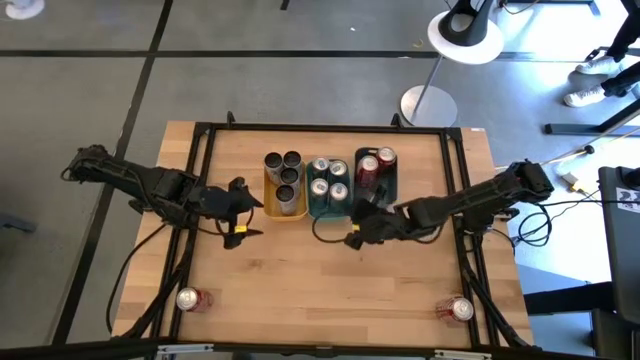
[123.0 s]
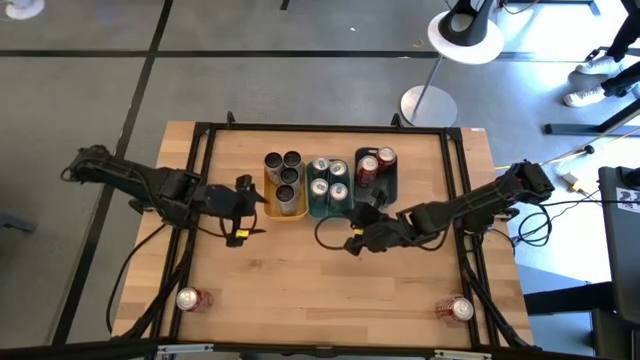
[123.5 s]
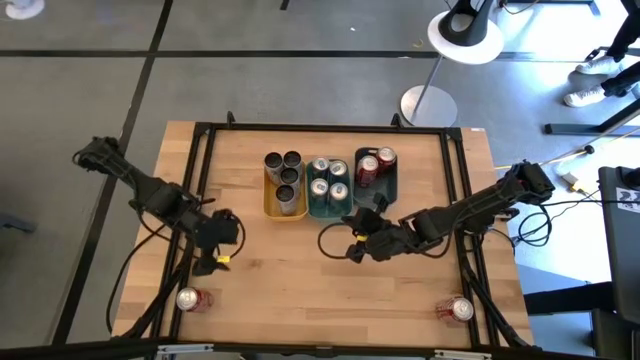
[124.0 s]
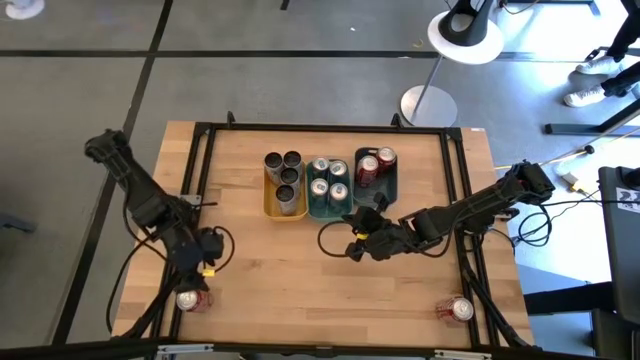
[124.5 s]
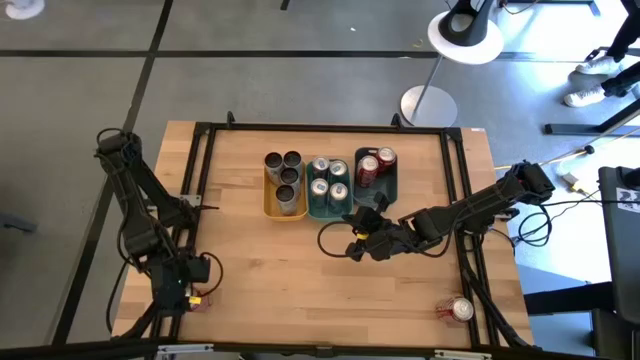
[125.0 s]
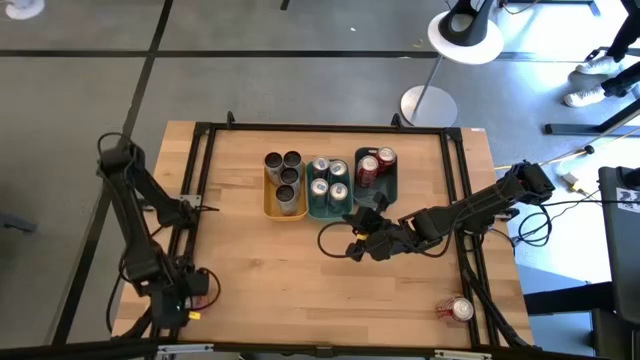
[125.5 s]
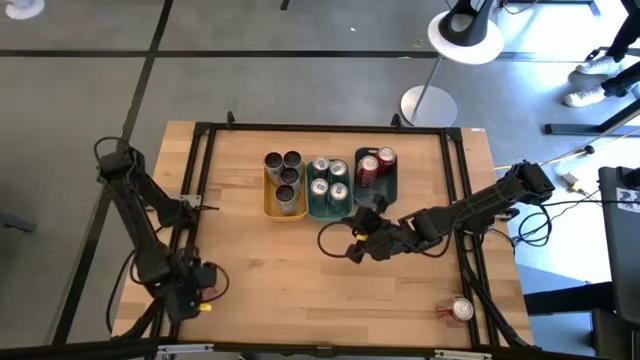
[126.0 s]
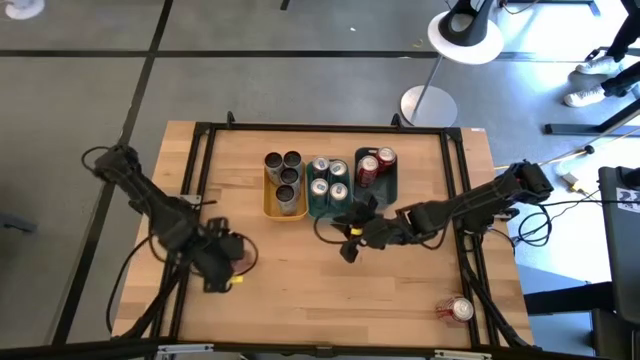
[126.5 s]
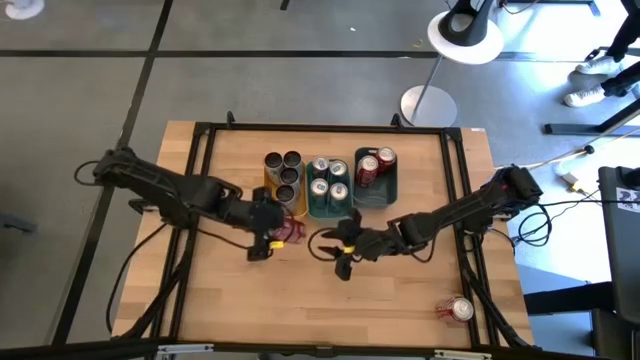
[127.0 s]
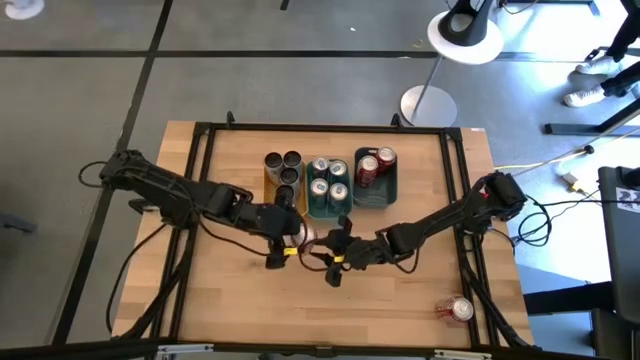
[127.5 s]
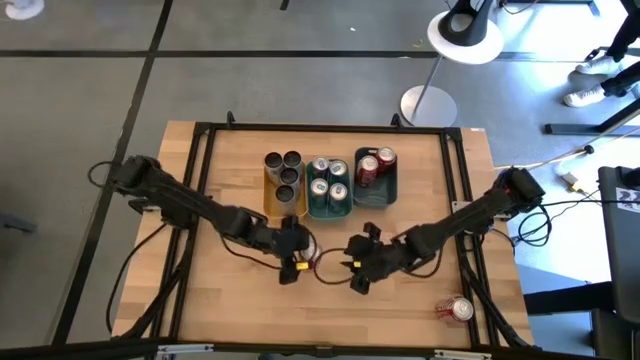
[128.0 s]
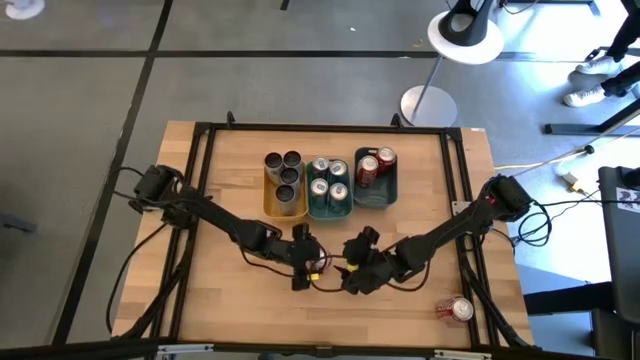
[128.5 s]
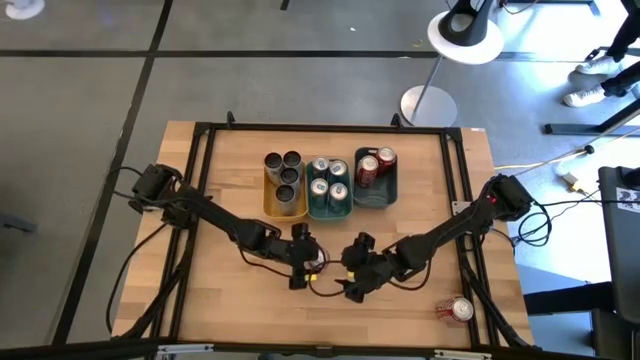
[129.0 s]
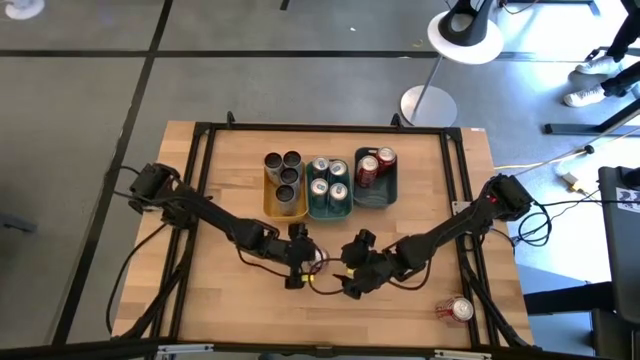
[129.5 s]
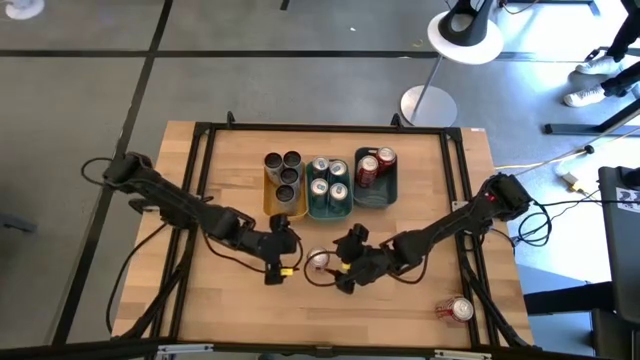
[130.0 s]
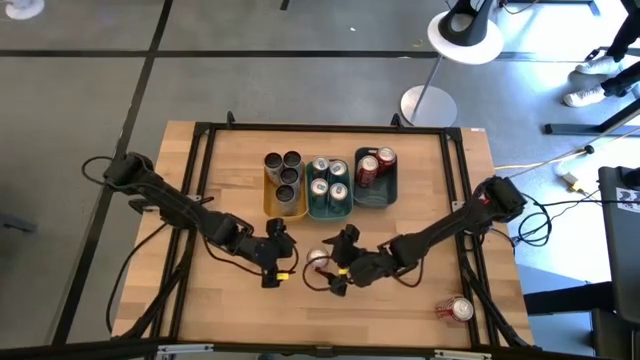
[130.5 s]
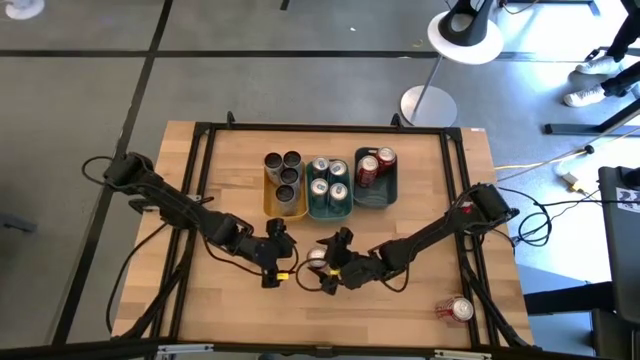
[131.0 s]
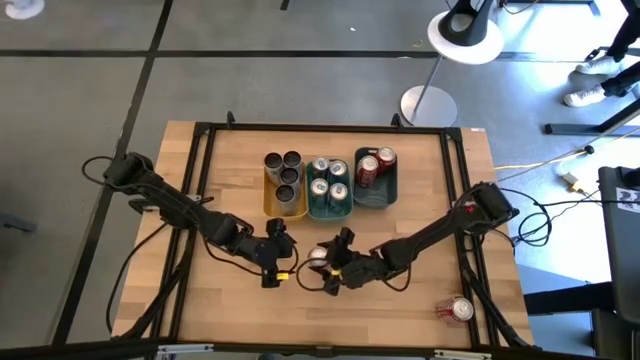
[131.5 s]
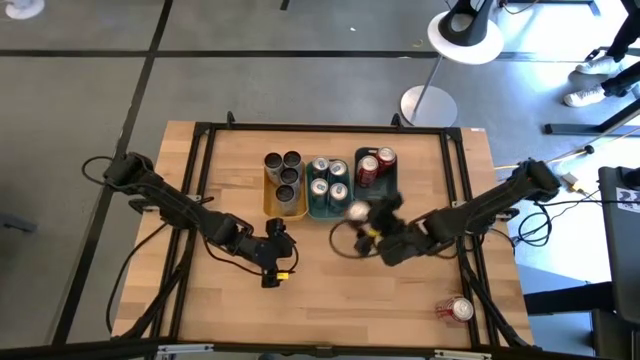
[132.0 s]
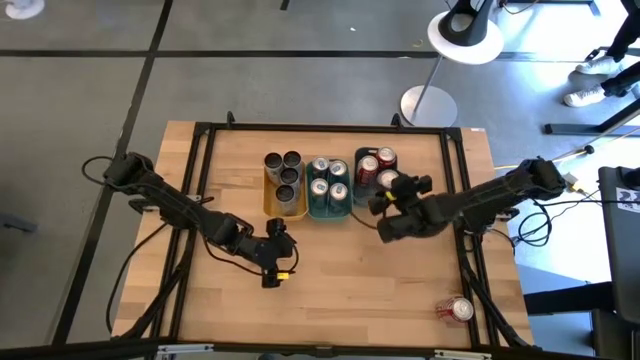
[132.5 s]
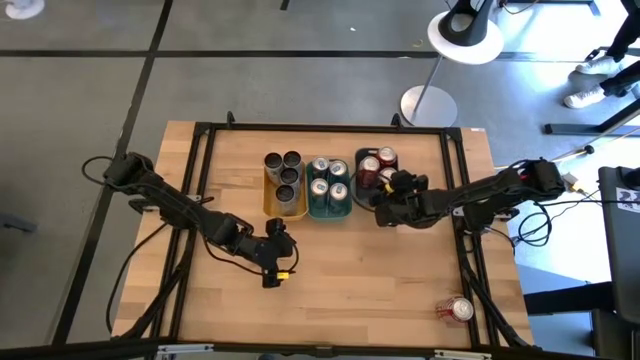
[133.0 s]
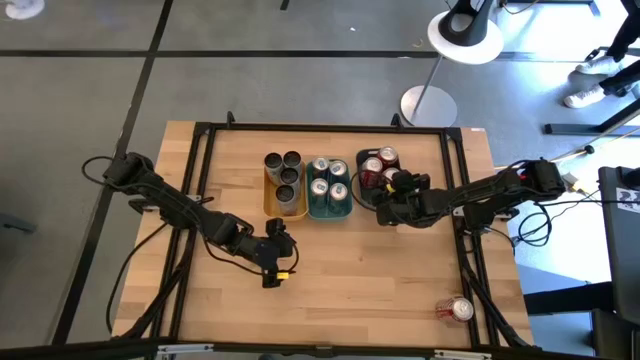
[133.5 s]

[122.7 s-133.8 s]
Task: Sort soda cans
Put the left red-white soda can into the blue bin

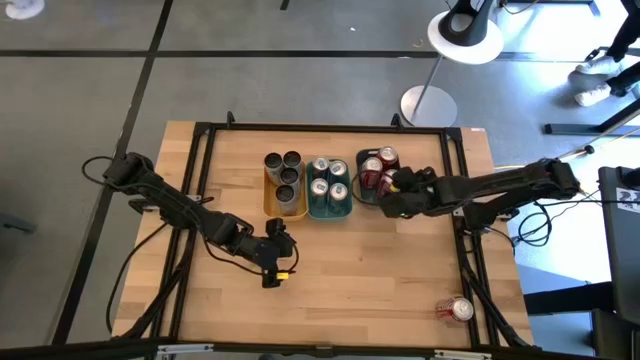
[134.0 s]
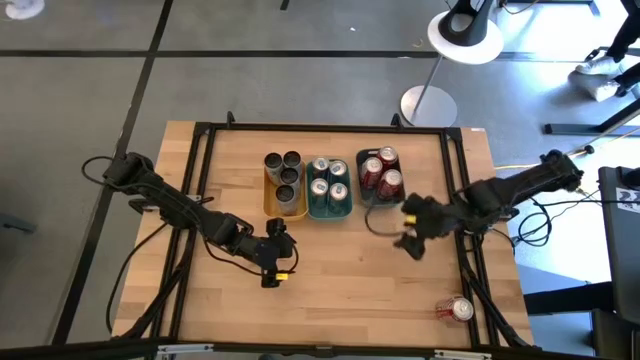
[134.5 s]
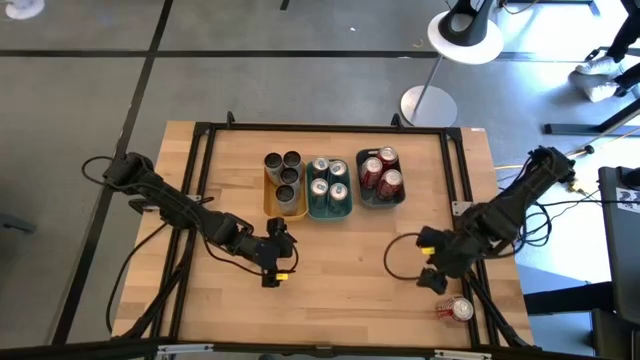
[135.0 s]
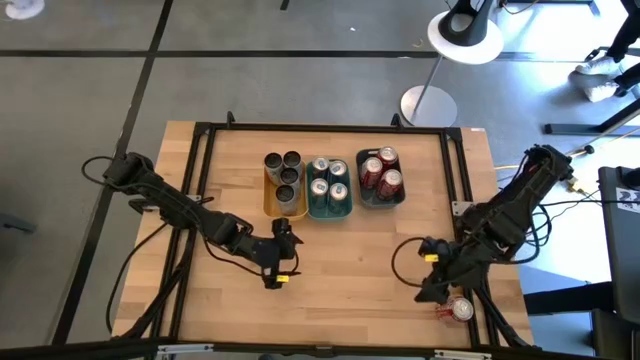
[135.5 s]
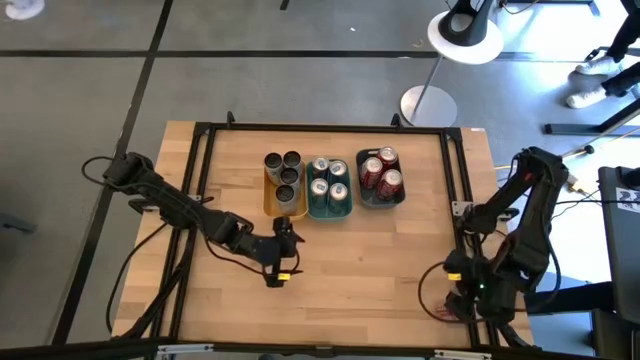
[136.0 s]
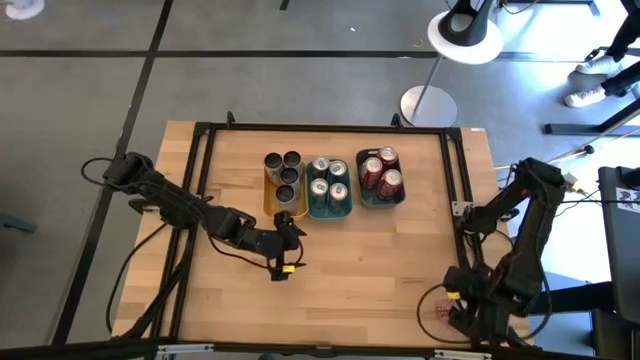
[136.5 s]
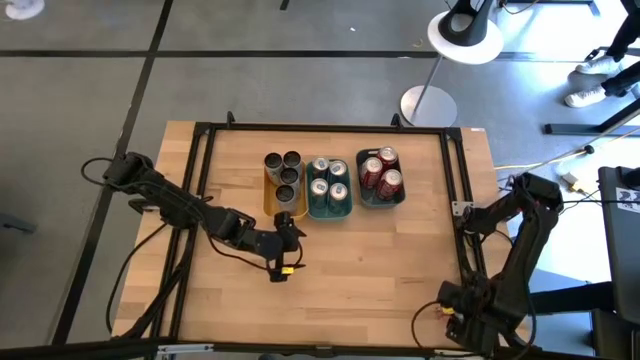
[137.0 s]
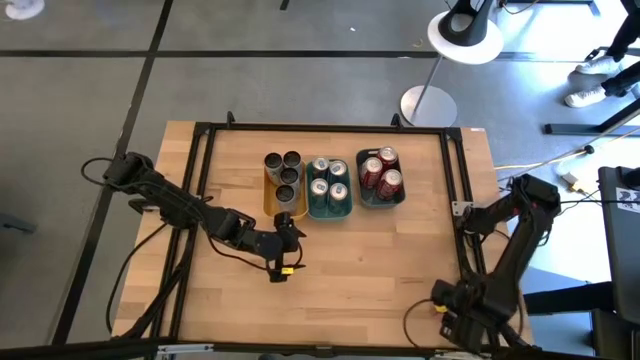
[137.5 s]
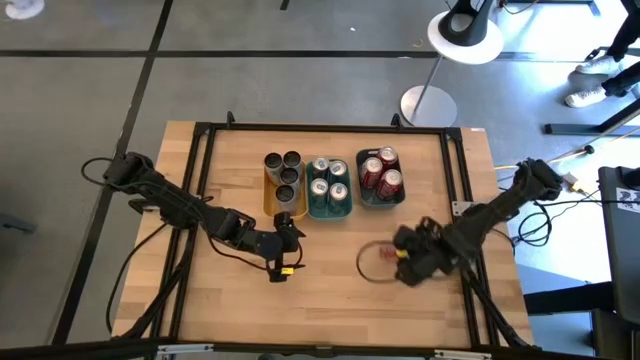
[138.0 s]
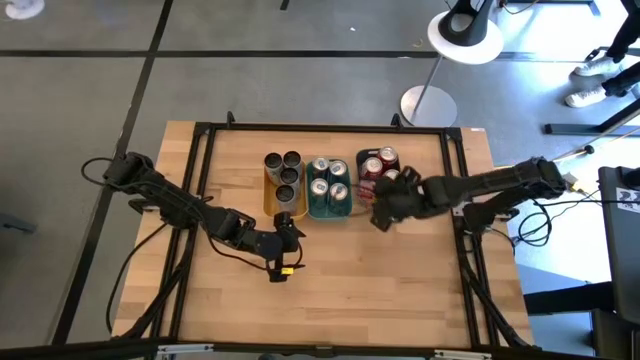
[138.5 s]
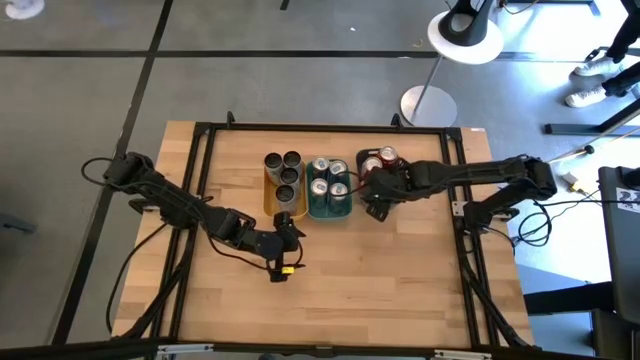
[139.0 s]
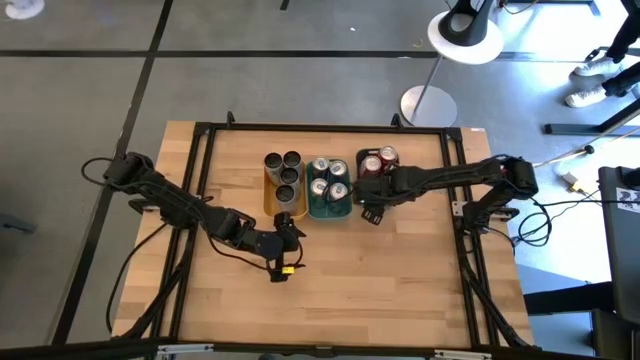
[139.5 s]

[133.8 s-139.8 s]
Put the red-white soda can into the blue bin

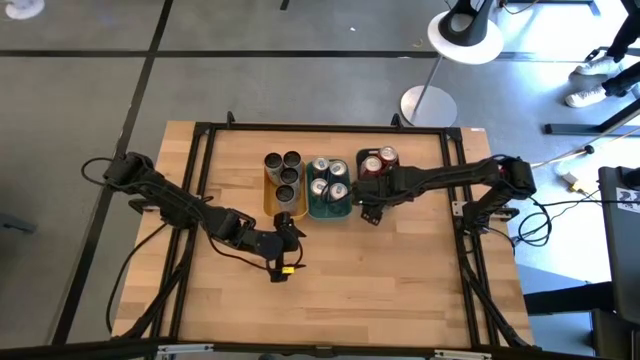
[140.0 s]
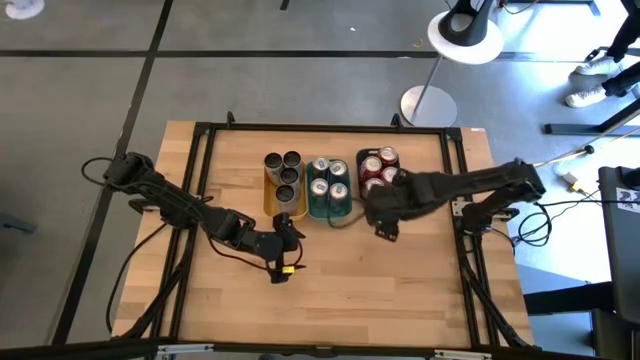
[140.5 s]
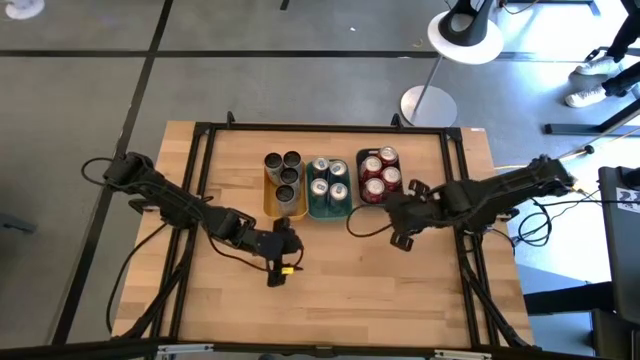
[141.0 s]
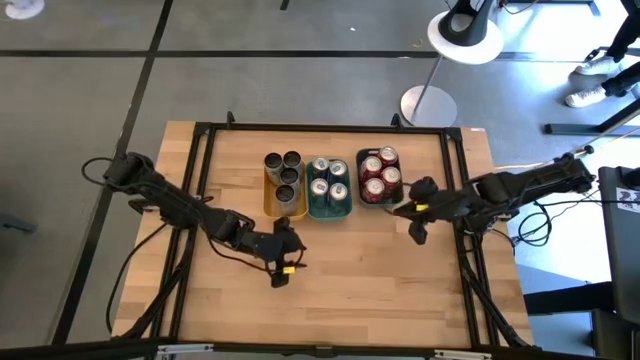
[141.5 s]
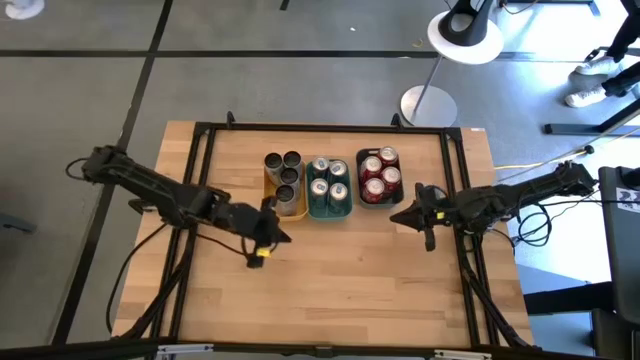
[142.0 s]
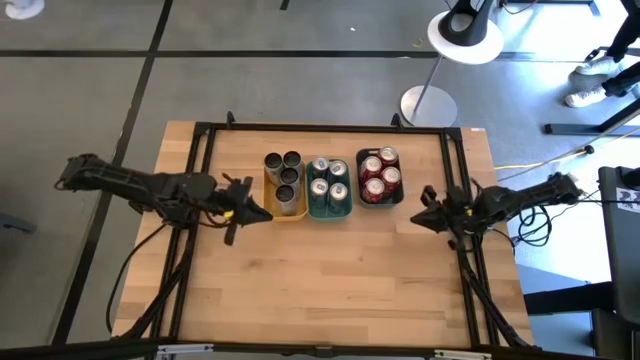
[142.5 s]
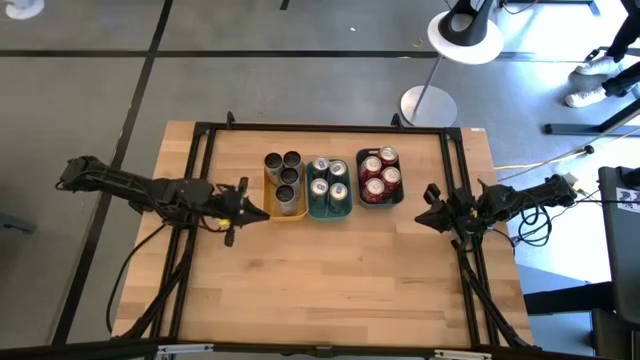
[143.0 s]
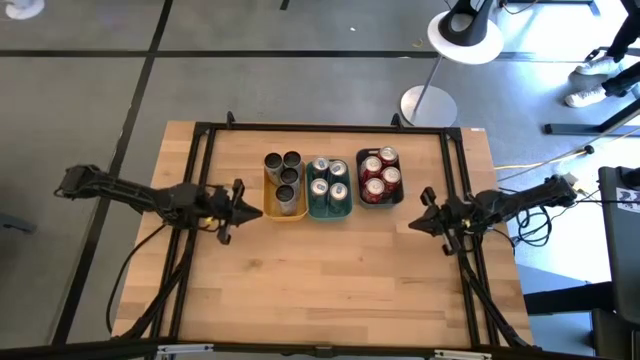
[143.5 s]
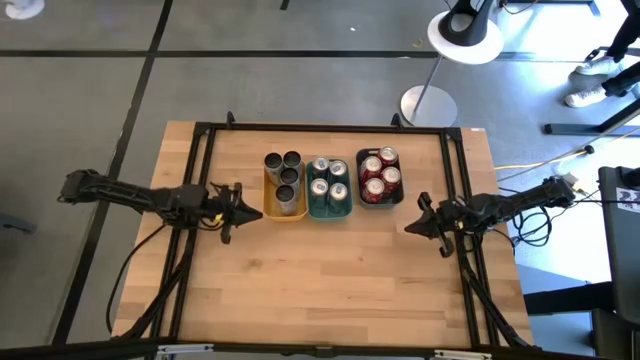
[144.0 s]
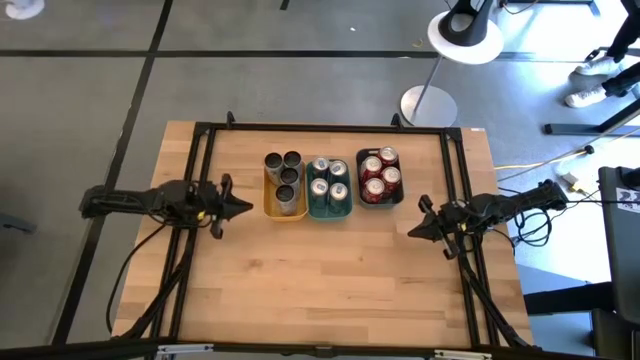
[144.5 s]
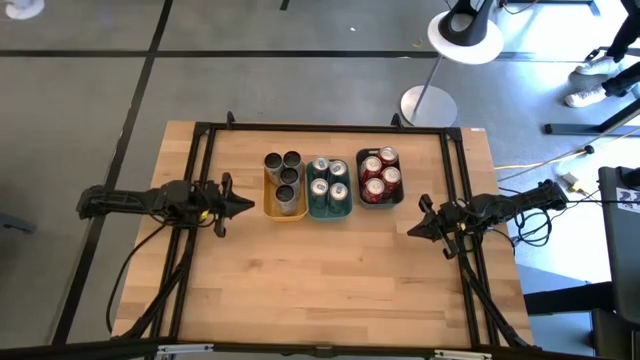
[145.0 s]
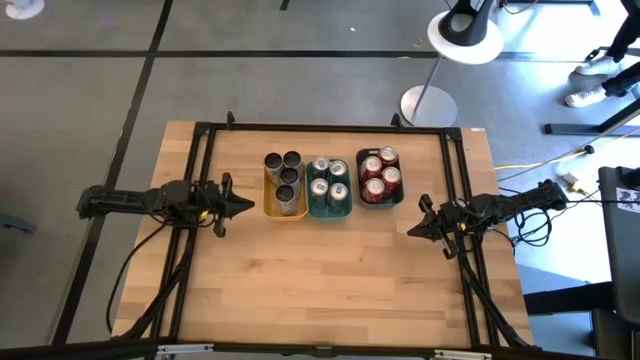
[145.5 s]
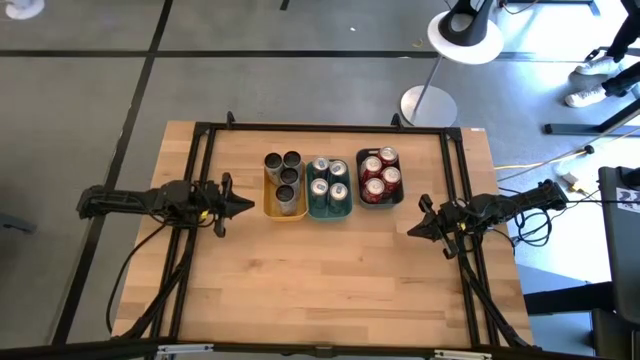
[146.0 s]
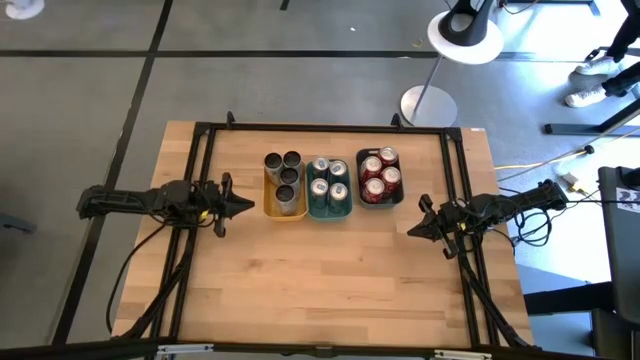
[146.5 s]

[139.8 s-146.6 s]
Return to Home Position
